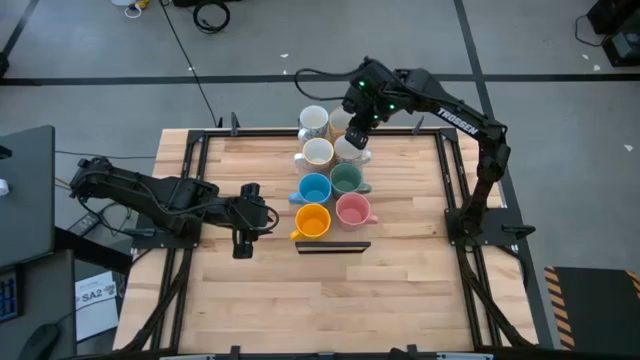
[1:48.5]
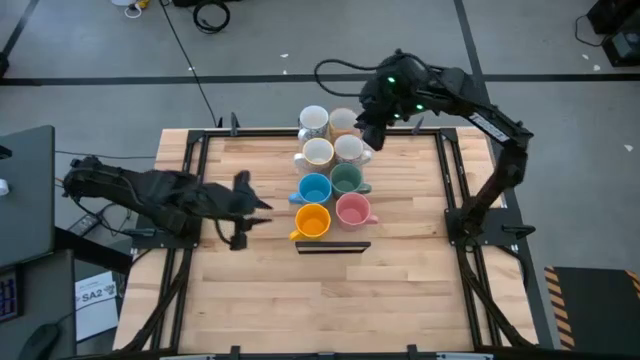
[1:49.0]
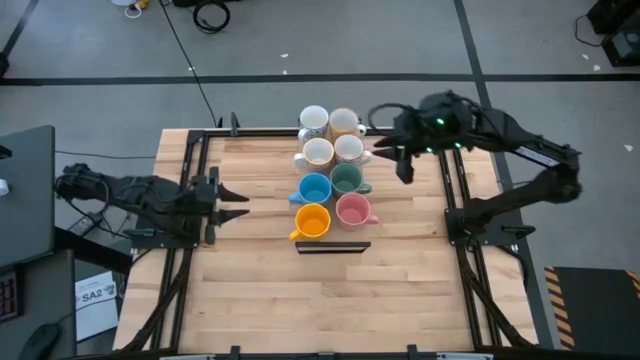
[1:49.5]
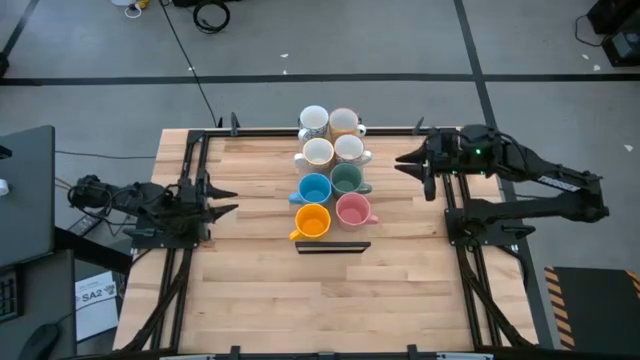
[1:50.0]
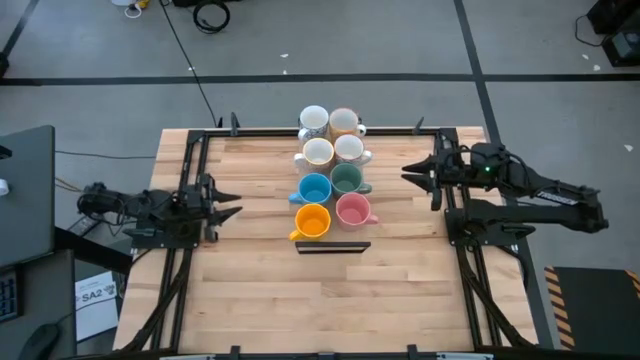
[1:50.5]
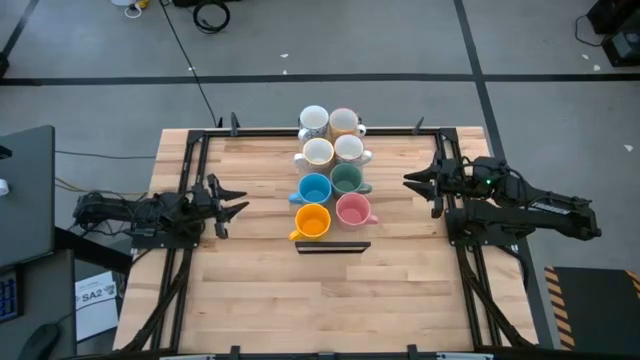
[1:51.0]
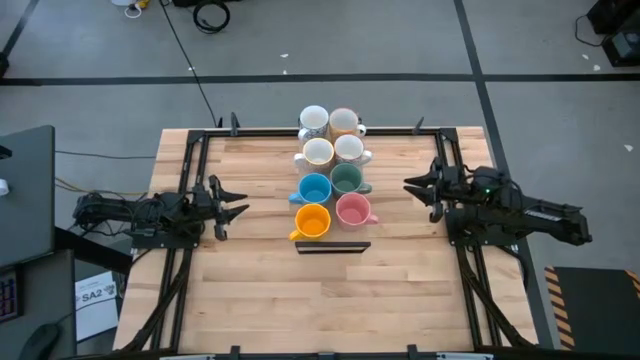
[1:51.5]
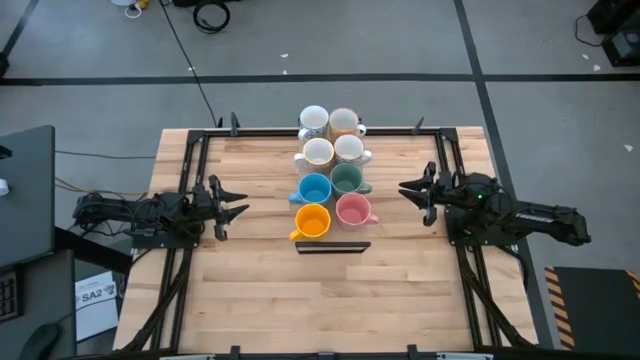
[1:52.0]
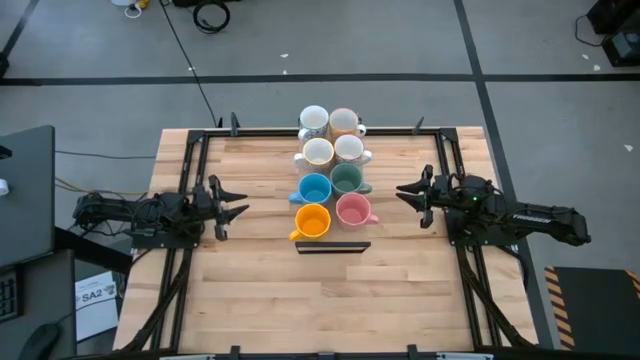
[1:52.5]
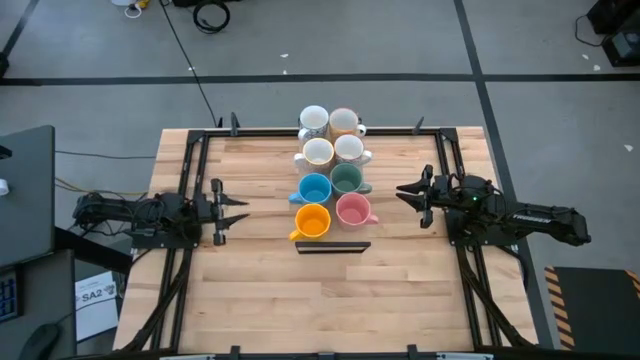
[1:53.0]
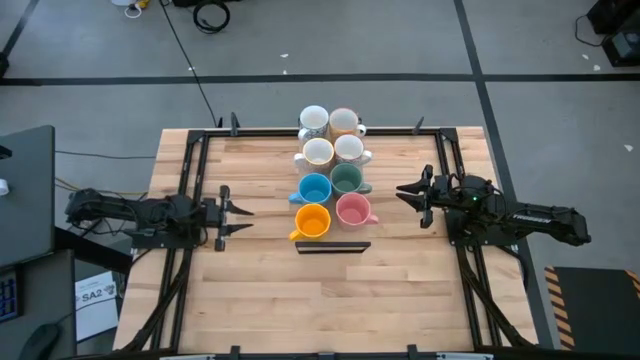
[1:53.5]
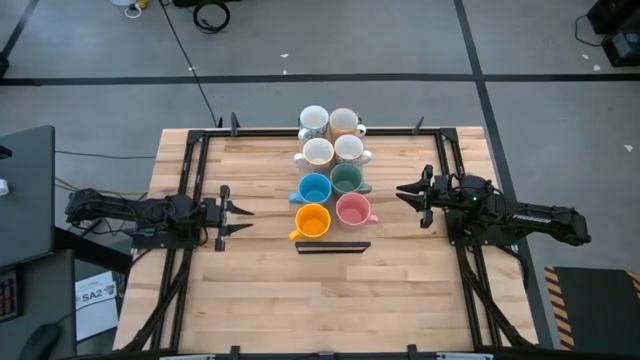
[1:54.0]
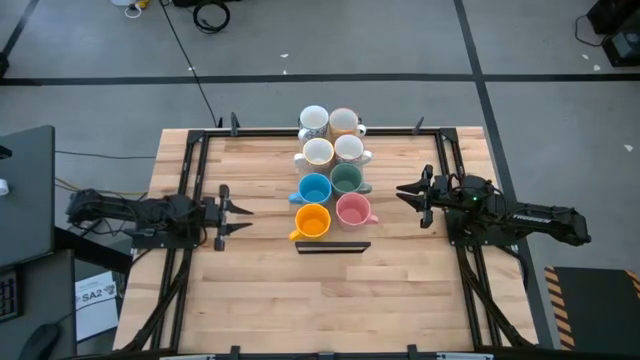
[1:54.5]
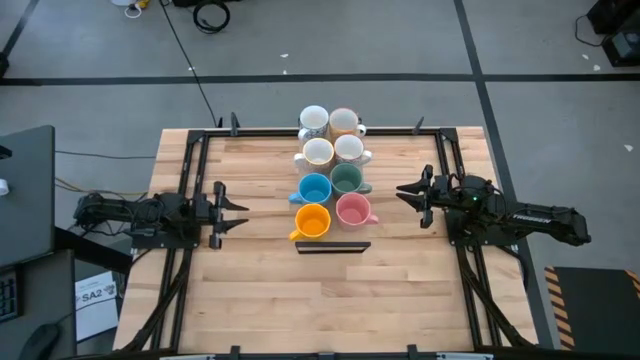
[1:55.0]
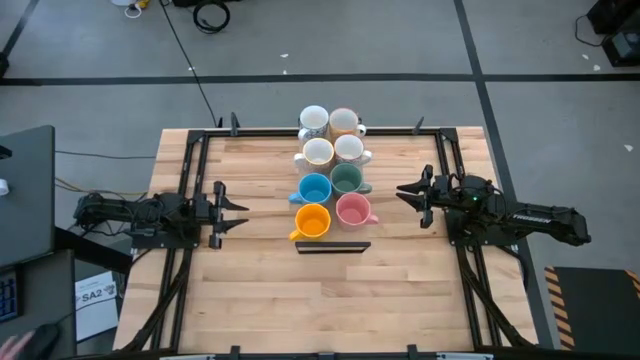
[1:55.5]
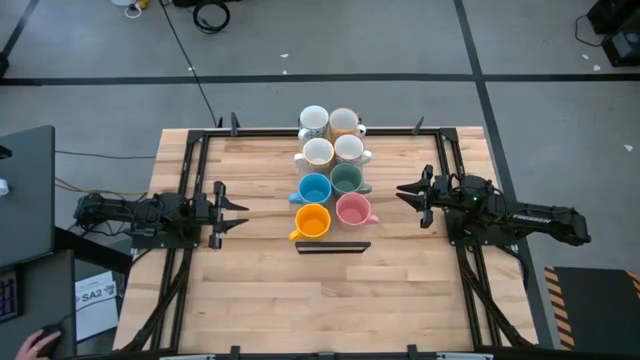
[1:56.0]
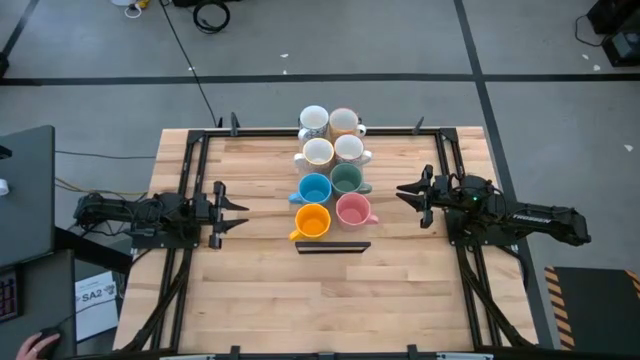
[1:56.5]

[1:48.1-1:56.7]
Task: Place coffee mugs
Return to Home Position

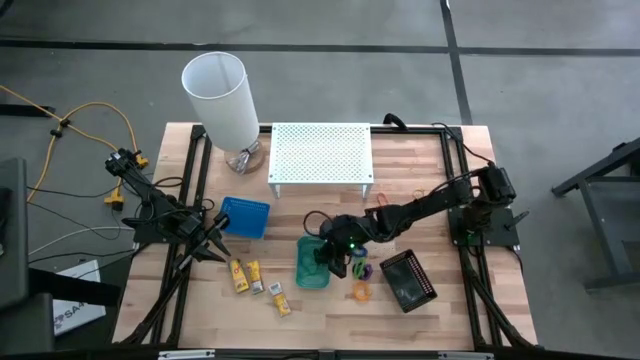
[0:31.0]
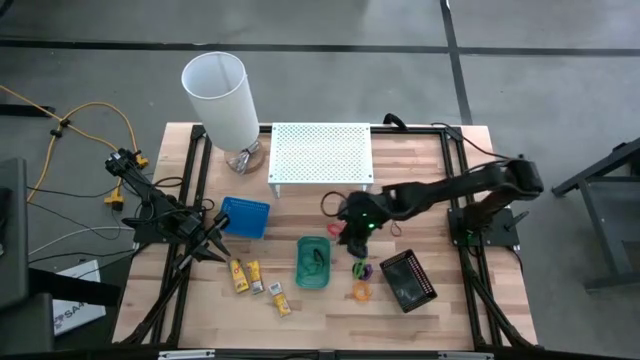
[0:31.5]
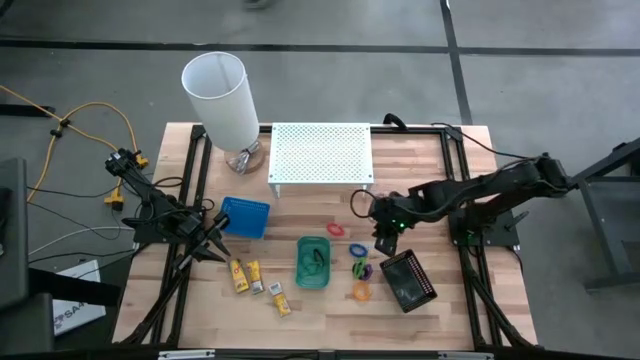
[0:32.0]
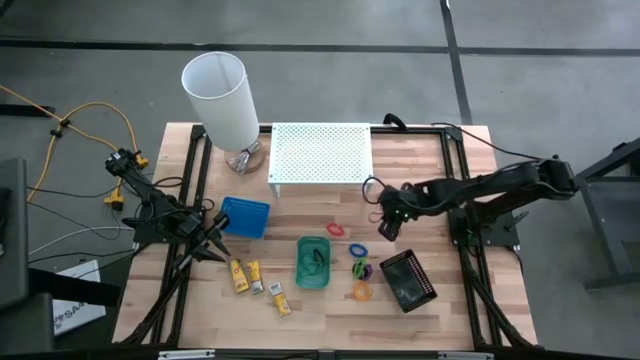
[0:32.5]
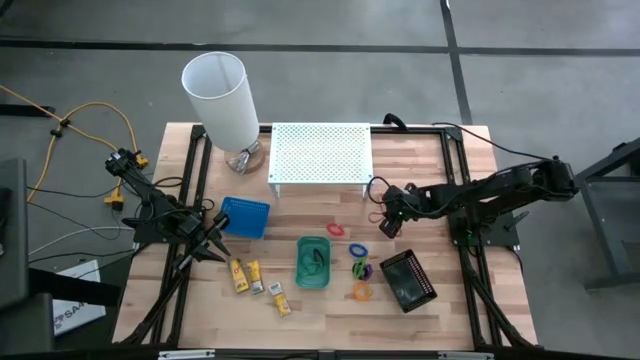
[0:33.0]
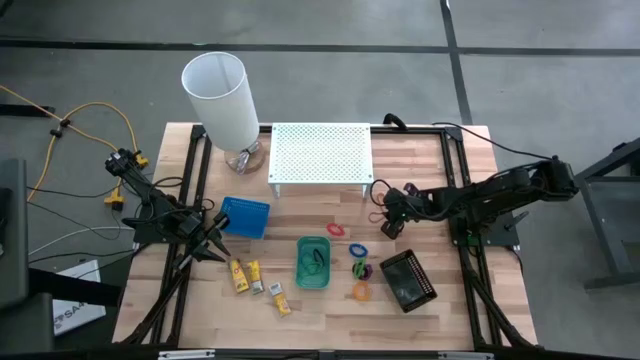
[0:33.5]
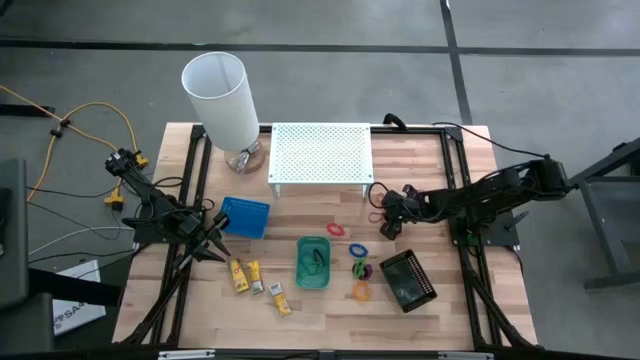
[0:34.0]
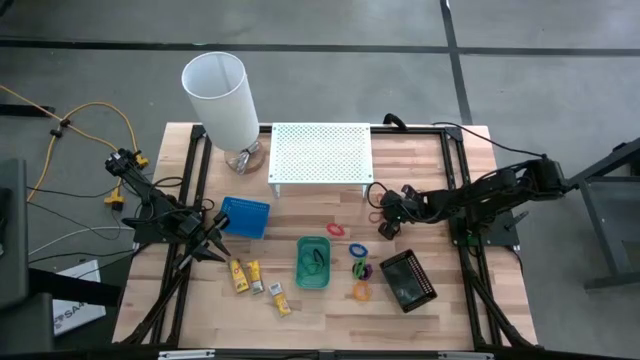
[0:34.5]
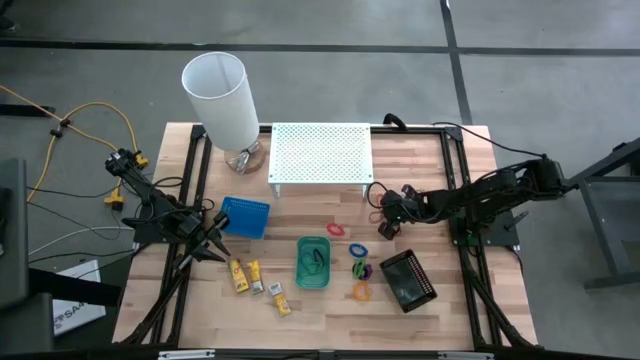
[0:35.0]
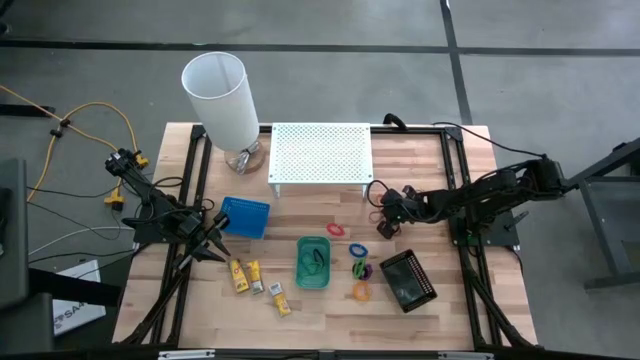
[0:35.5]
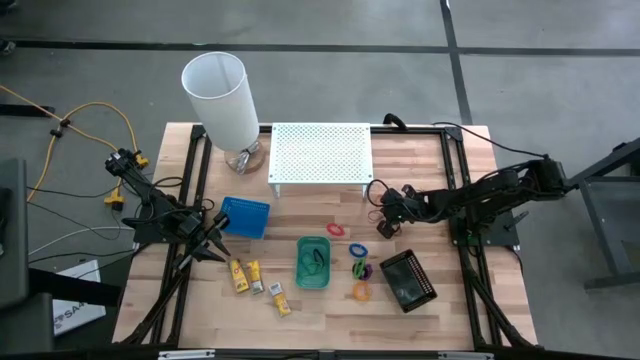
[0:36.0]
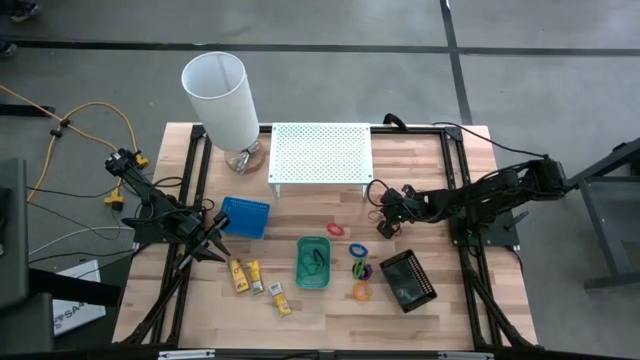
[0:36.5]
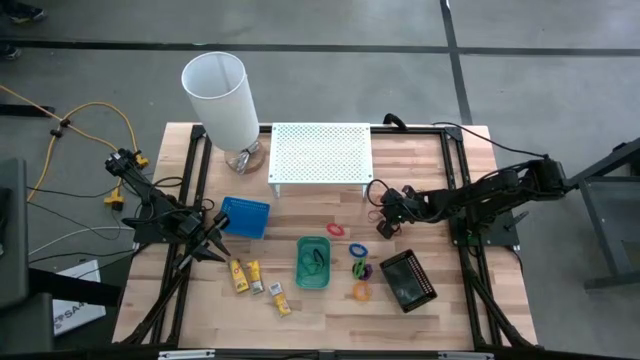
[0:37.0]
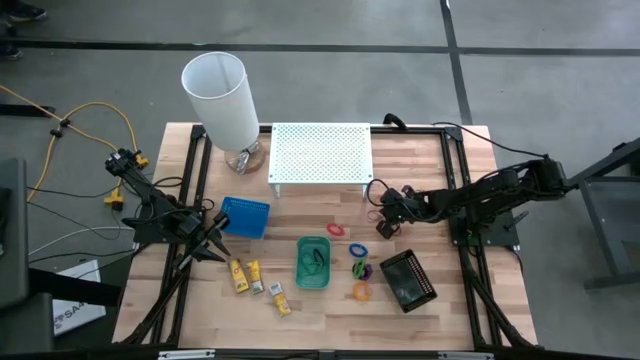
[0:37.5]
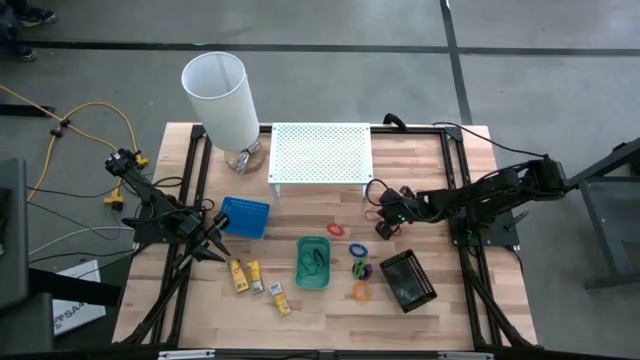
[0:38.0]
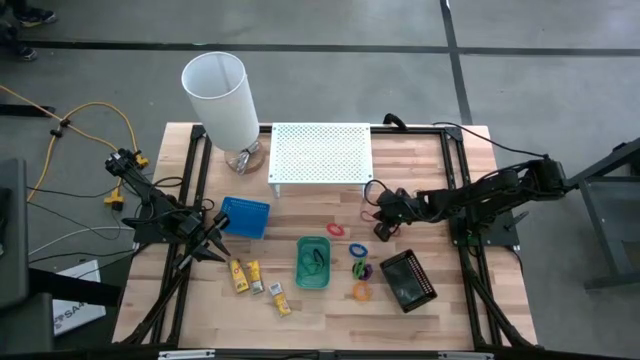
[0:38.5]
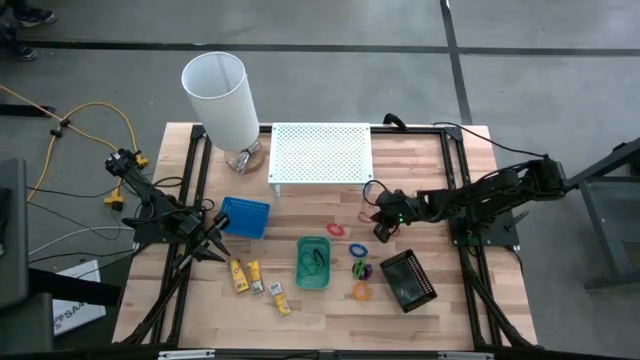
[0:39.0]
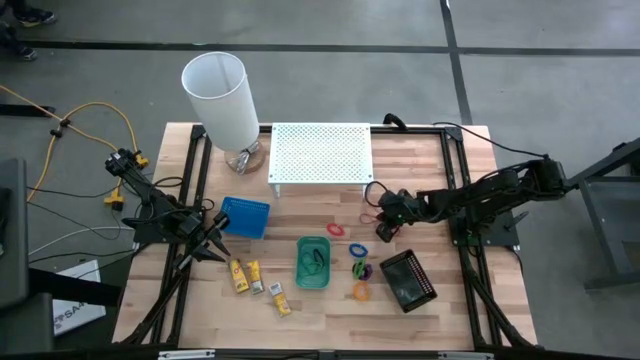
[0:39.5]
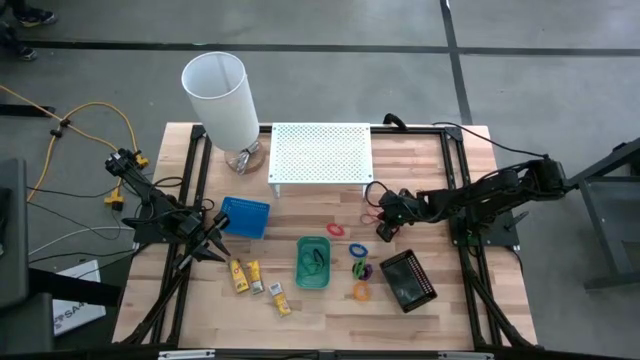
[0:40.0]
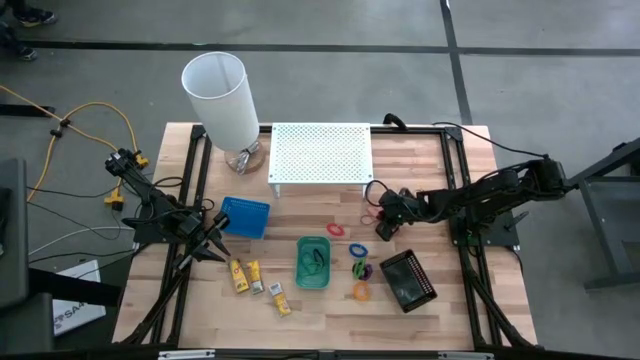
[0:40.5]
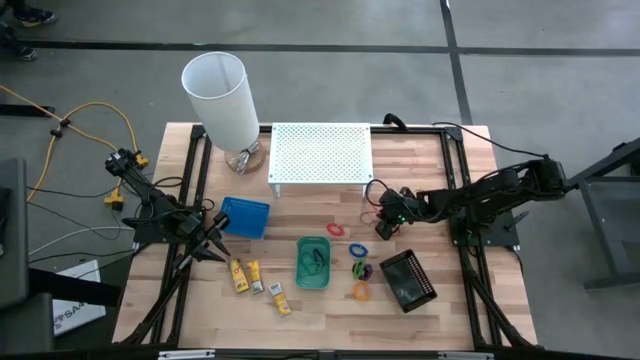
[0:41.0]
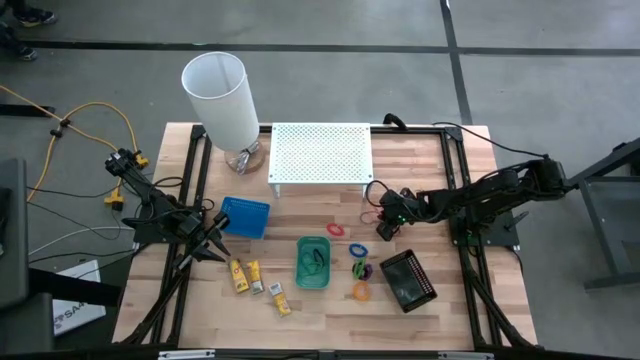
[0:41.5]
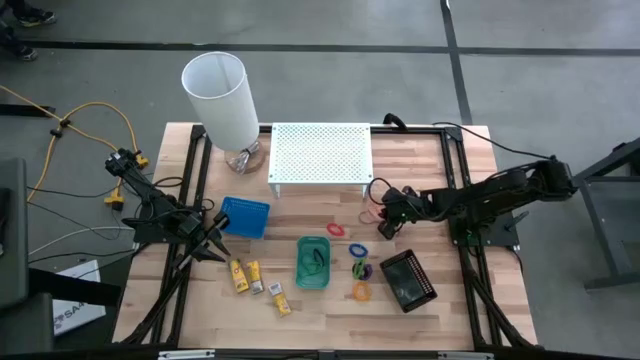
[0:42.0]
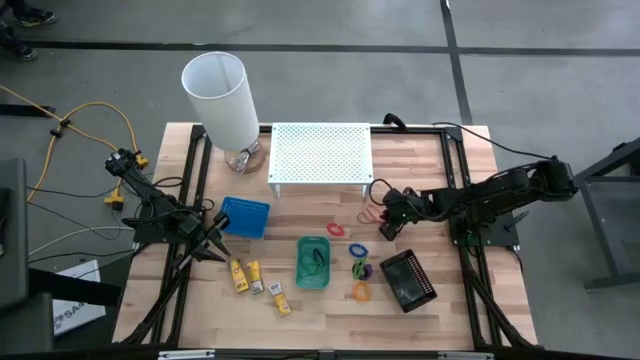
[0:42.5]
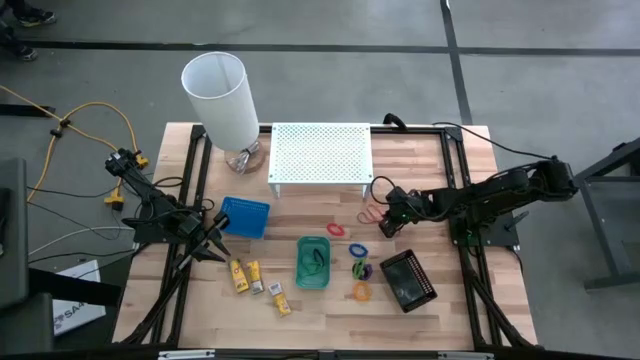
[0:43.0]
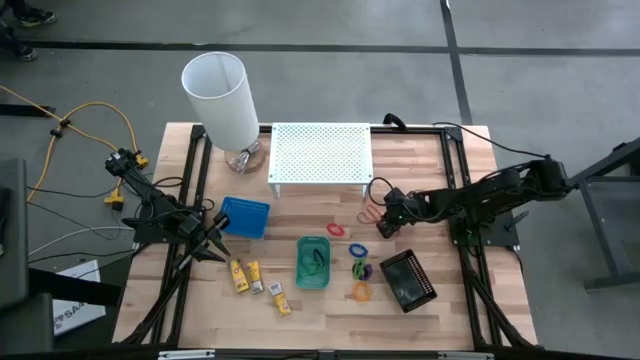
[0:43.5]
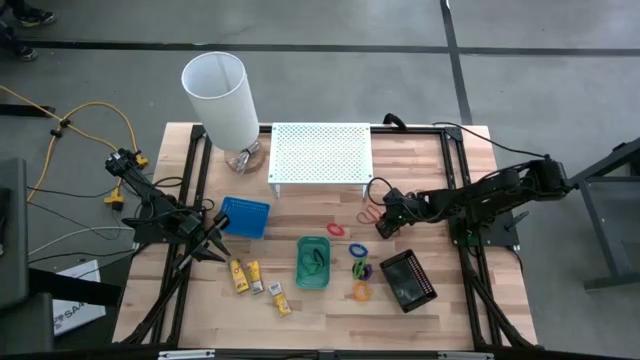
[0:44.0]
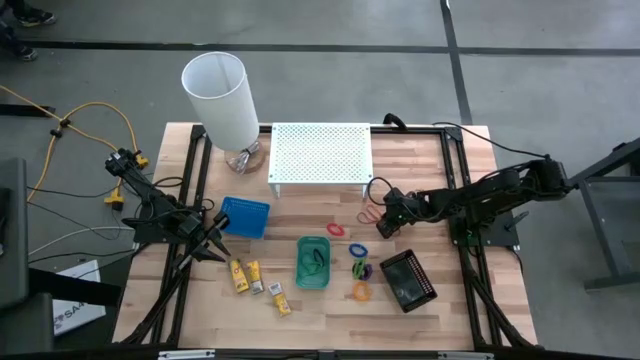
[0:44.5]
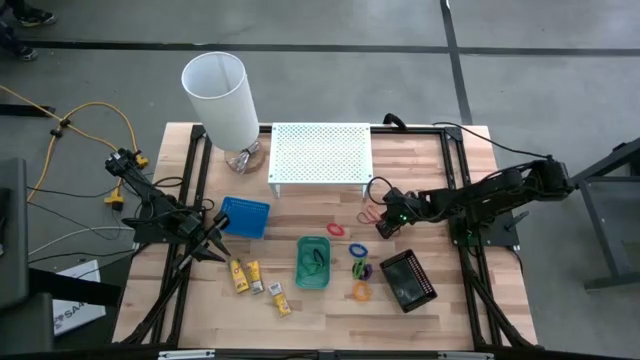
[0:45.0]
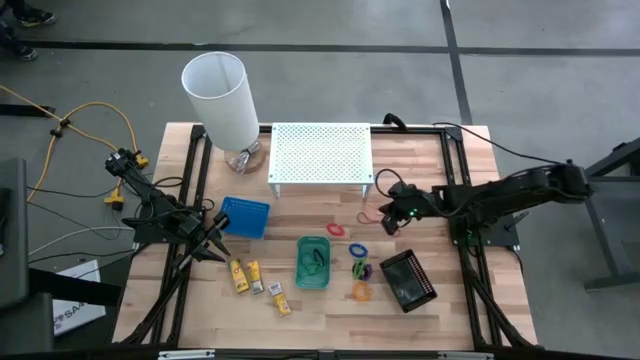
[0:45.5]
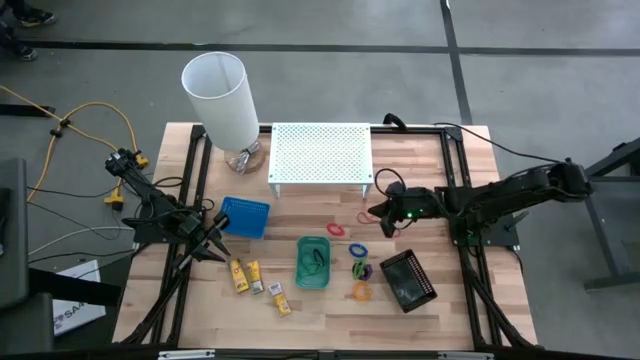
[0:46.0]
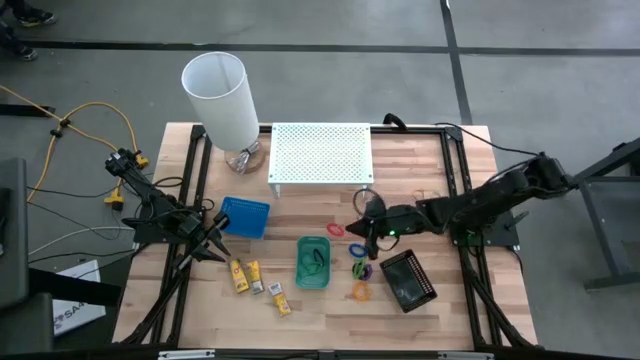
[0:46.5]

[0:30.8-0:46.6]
Task: Pick & Place Office Desk Supplies
Put the orange rubber band into the green bin
